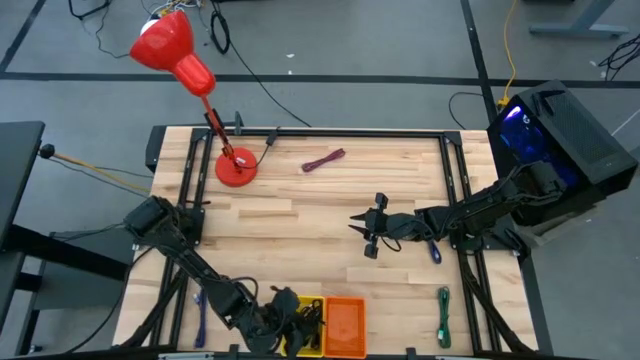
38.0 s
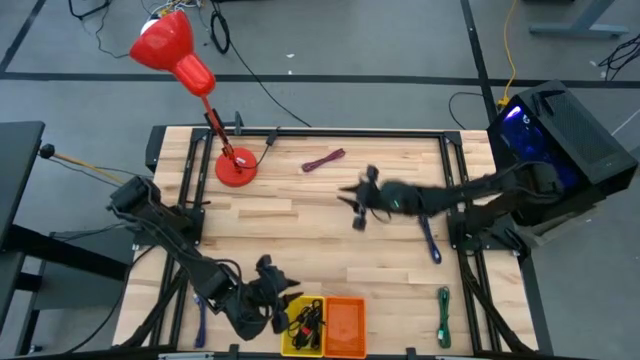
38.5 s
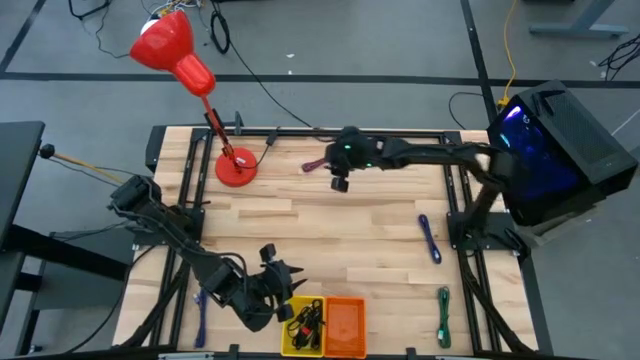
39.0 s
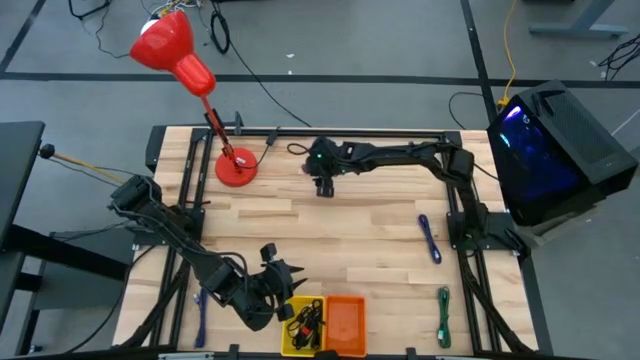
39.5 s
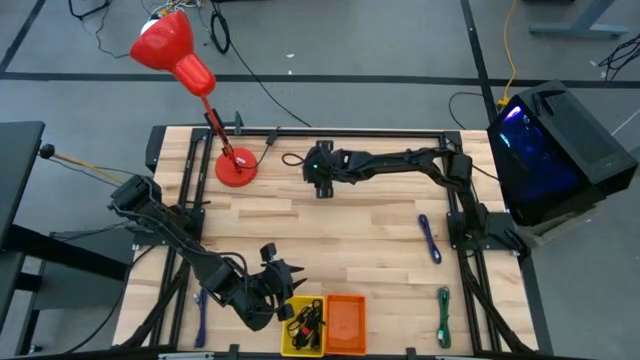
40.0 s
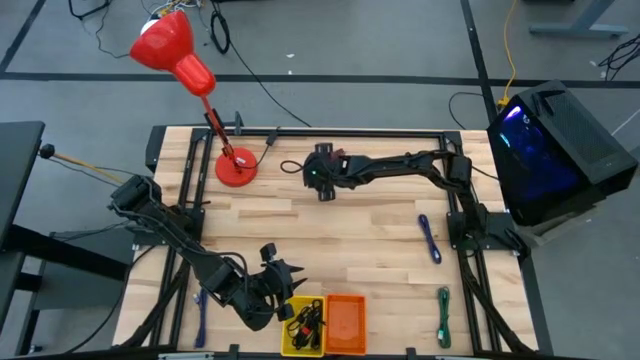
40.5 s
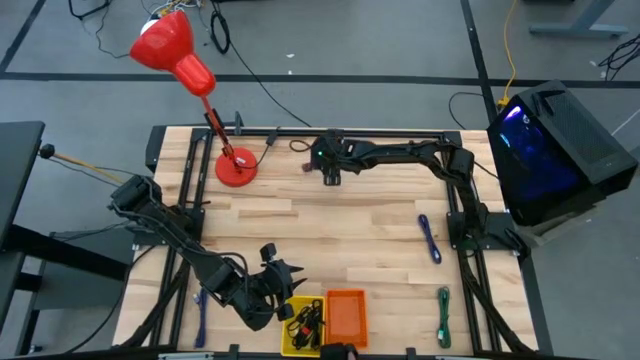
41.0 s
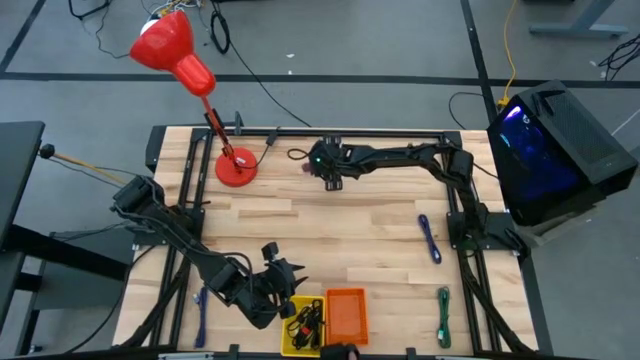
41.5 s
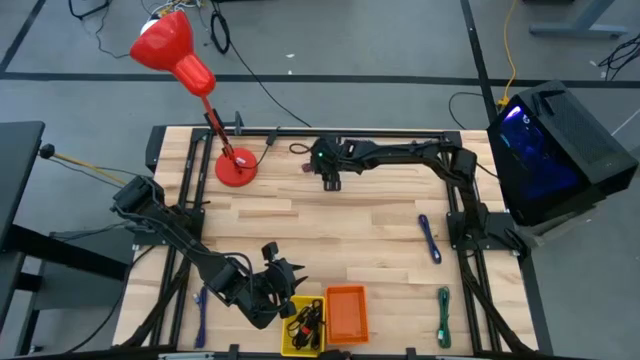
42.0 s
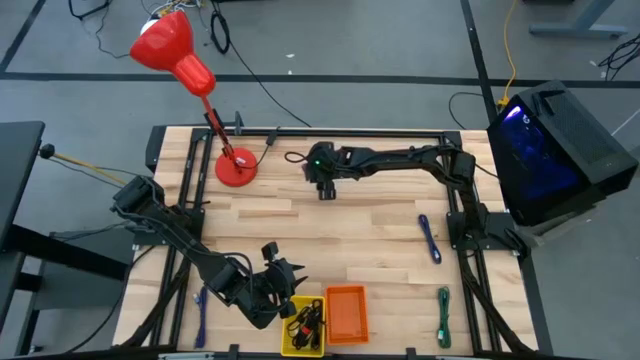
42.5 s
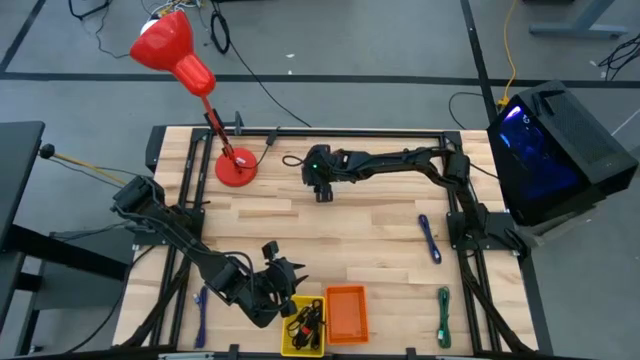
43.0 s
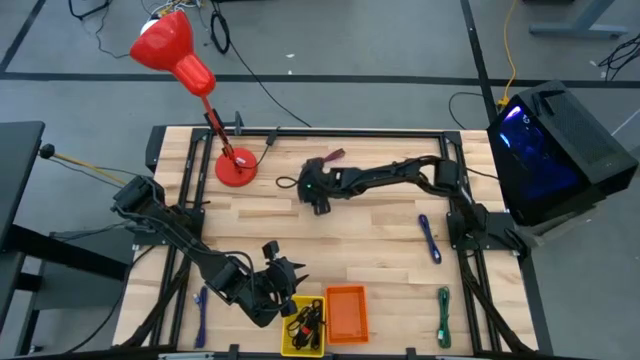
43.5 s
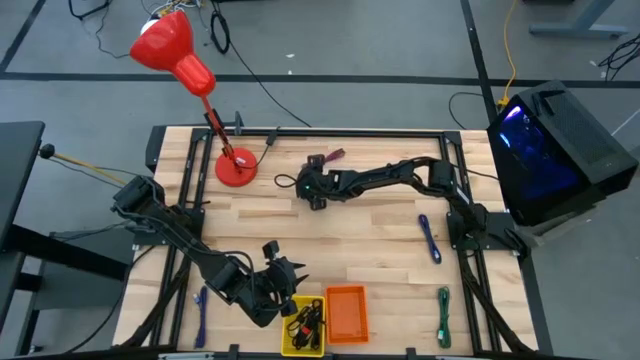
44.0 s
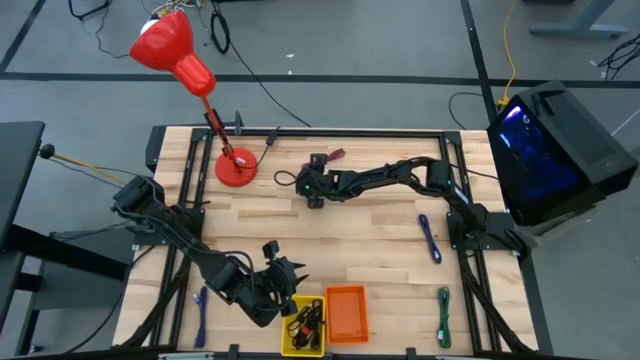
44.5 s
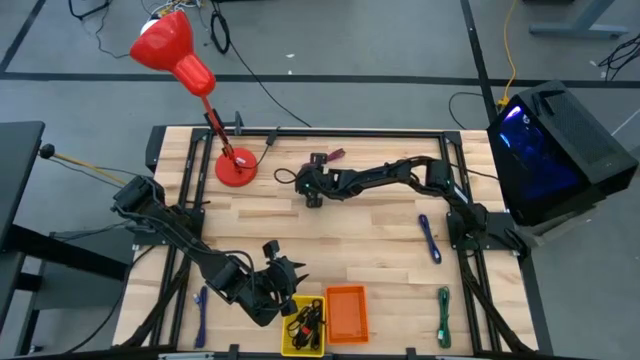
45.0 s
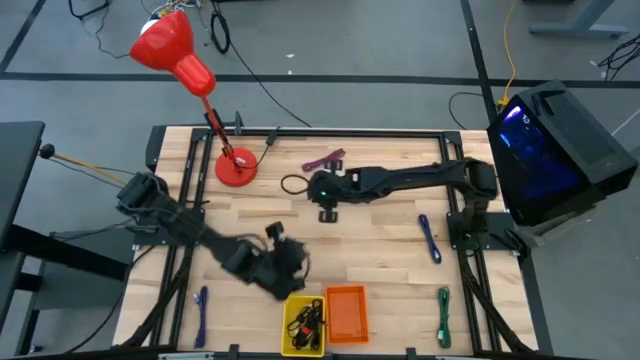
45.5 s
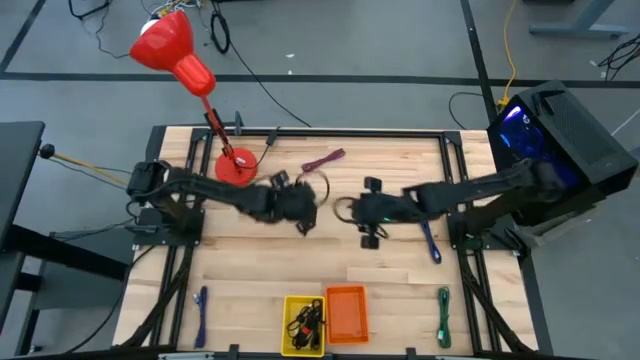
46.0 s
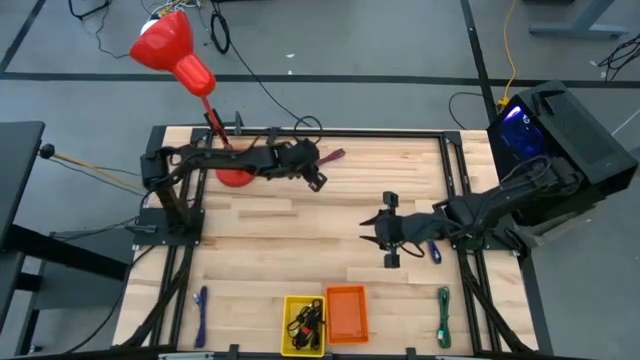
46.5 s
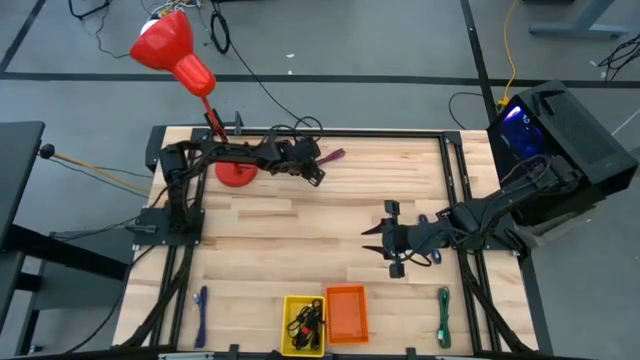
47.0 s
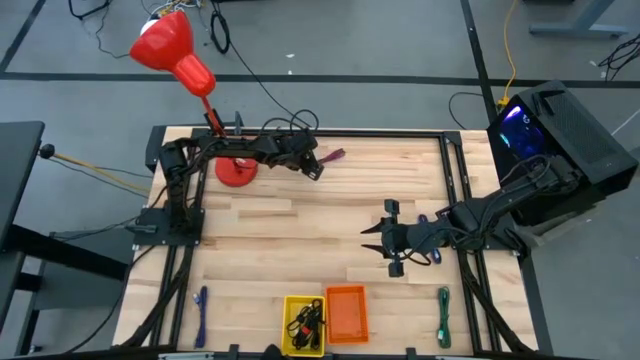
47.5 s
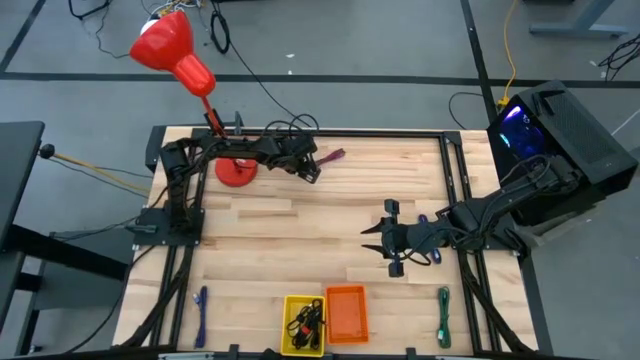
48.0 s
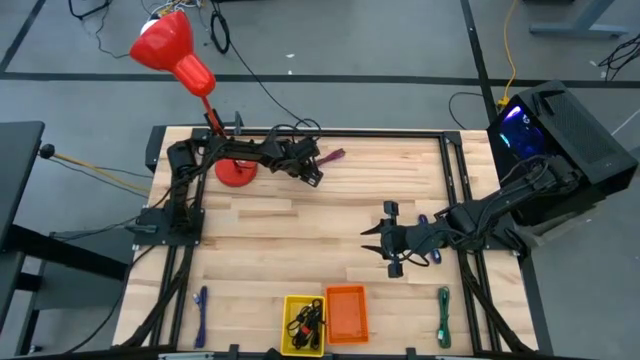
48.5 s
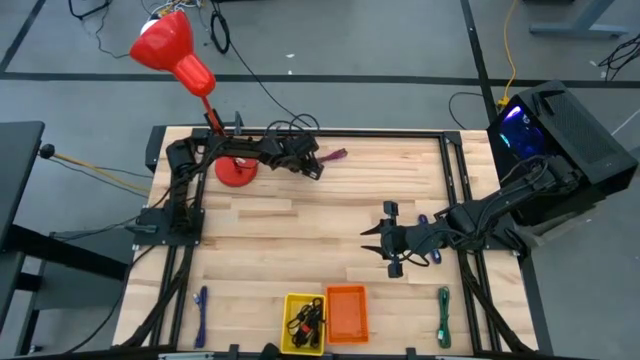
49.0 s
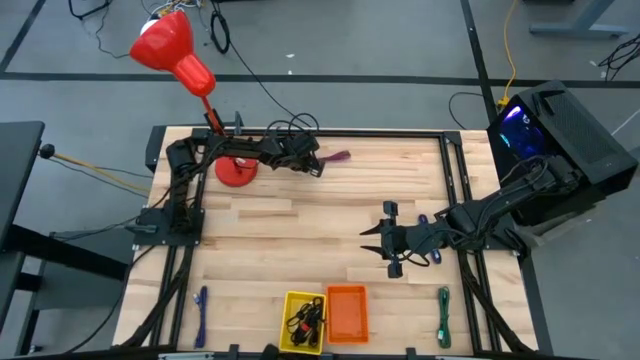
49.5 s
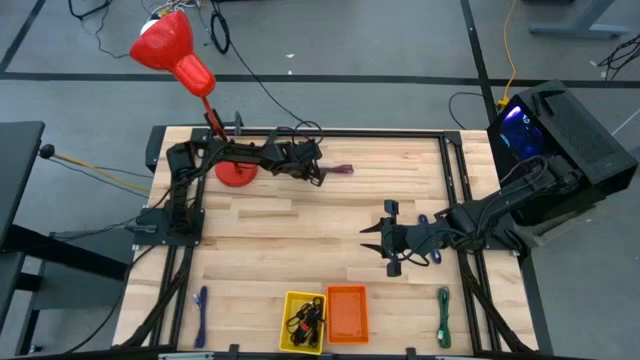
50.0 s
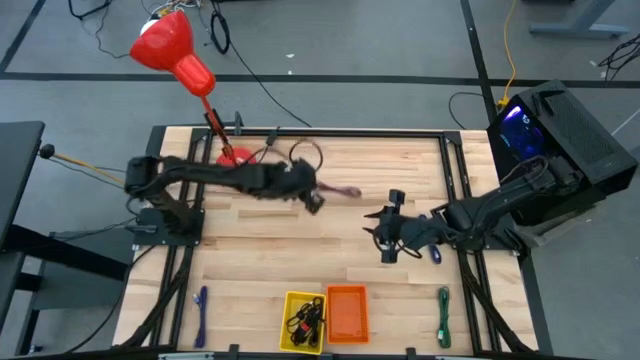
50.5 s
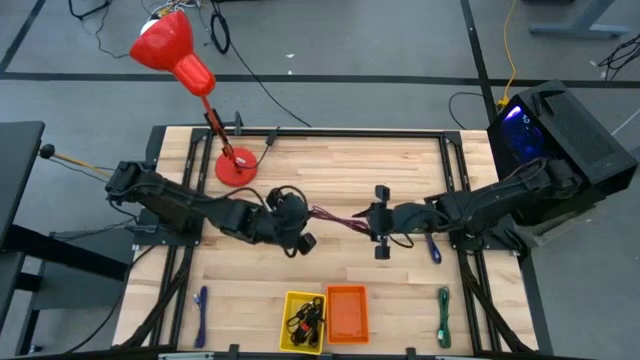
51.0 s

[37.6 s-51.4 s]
Task: Pick & Place USB Port
Put the black and pink charger cable into the orange bin

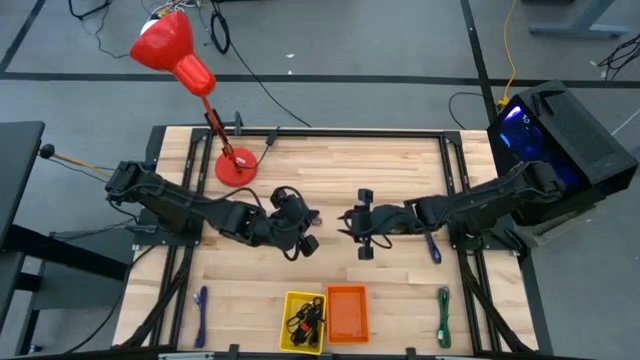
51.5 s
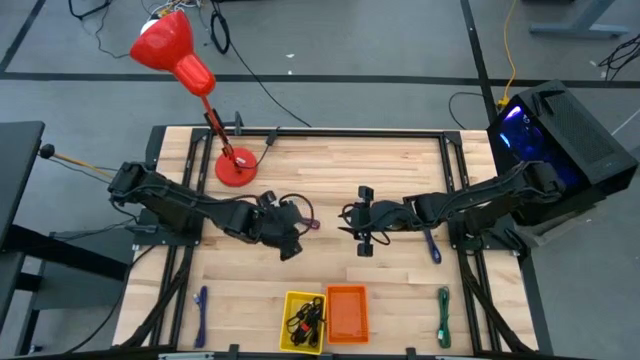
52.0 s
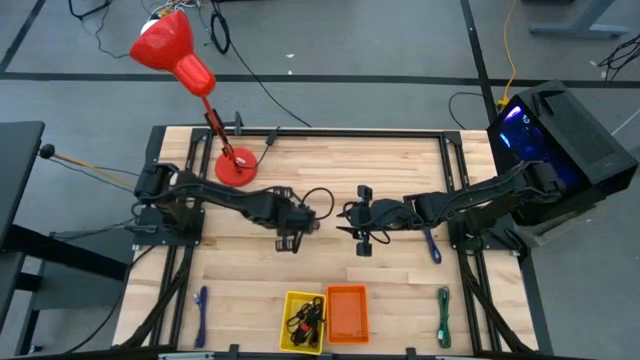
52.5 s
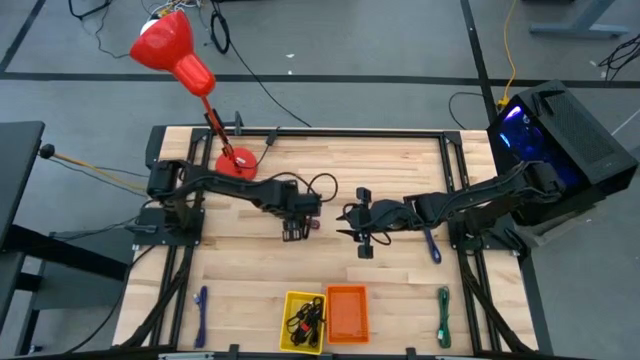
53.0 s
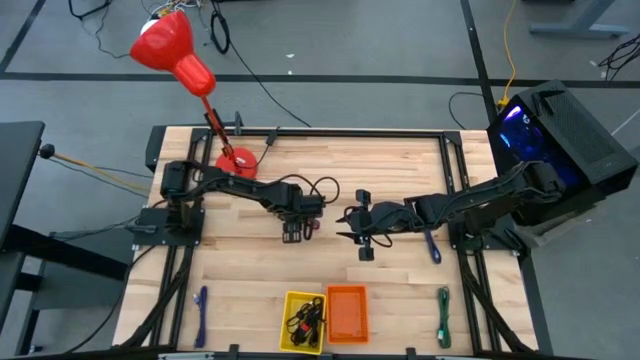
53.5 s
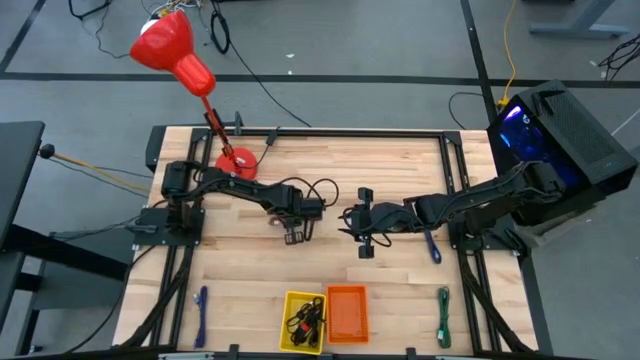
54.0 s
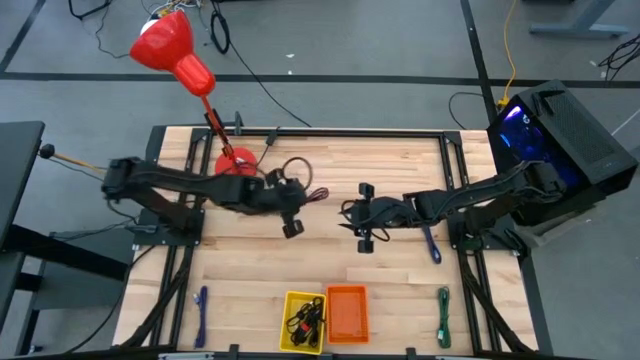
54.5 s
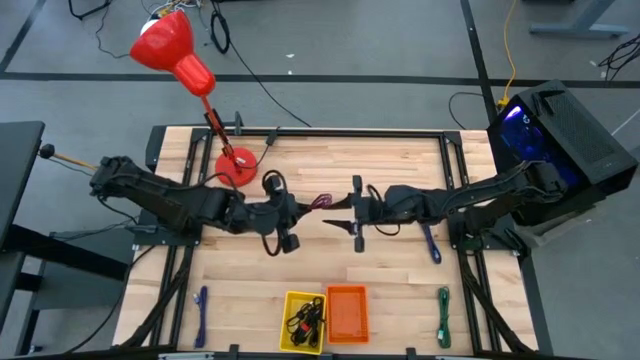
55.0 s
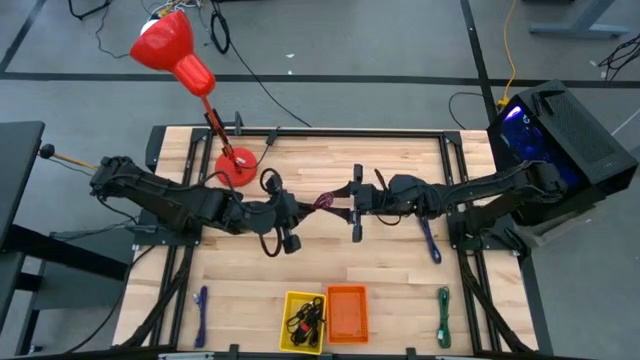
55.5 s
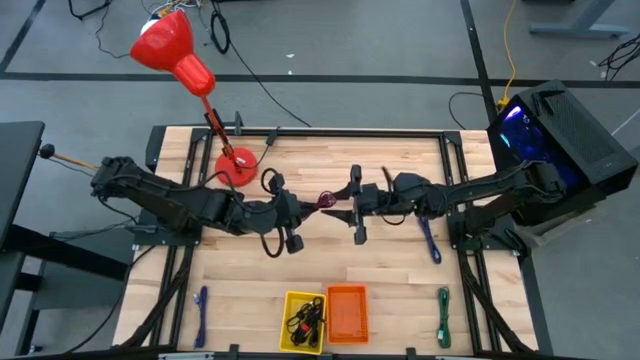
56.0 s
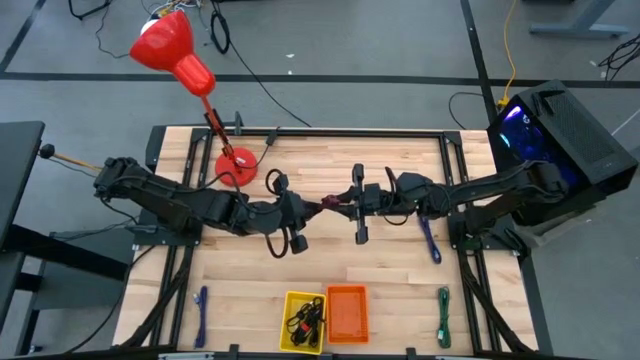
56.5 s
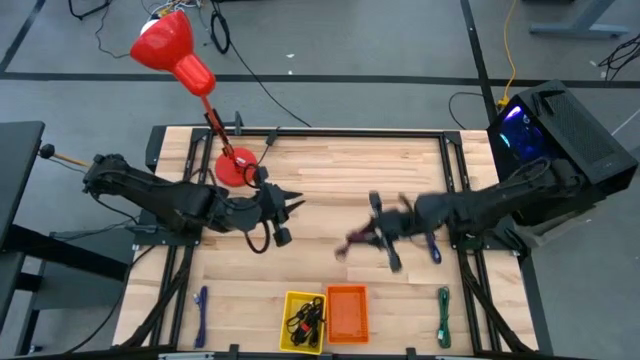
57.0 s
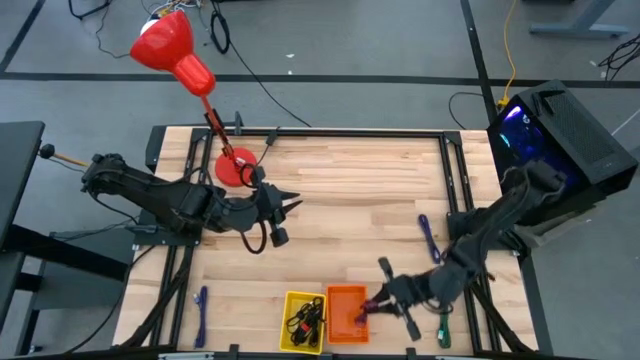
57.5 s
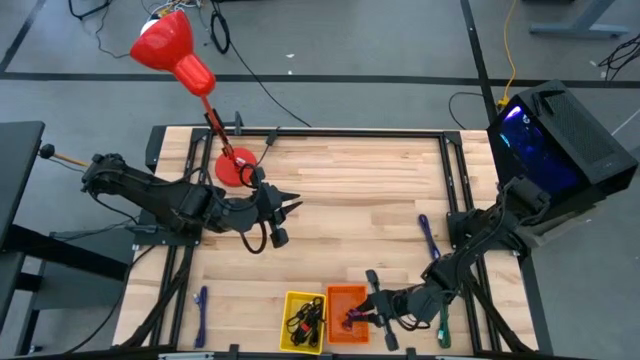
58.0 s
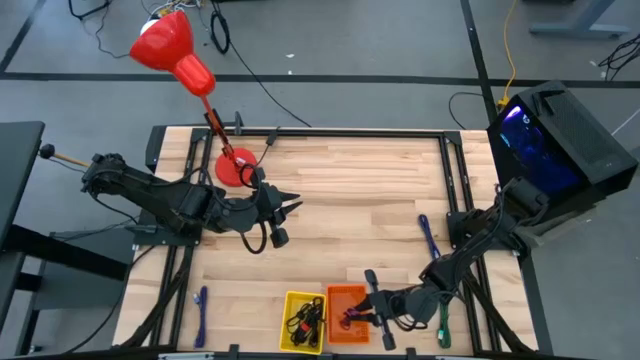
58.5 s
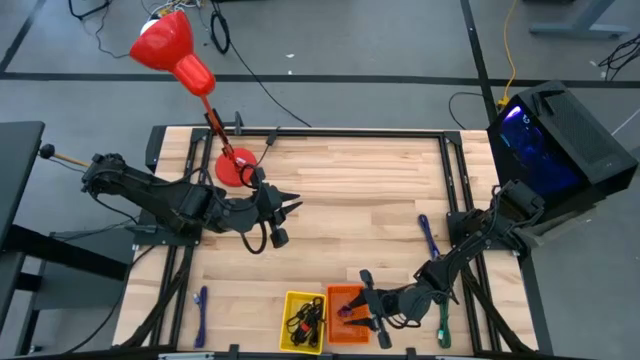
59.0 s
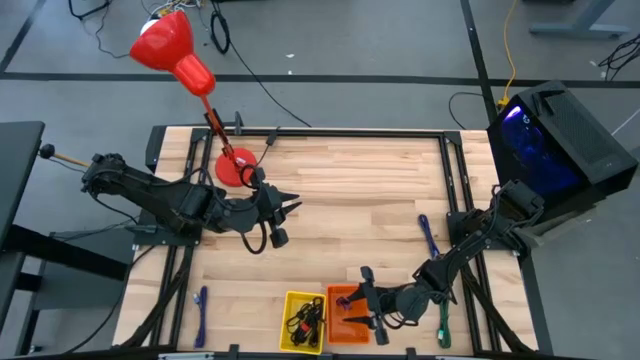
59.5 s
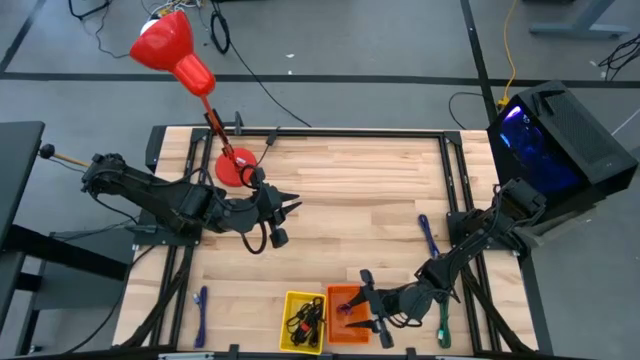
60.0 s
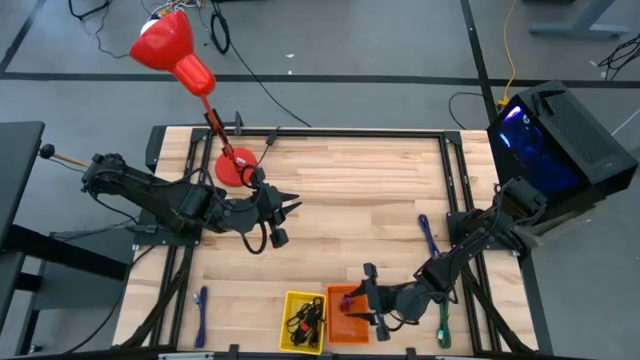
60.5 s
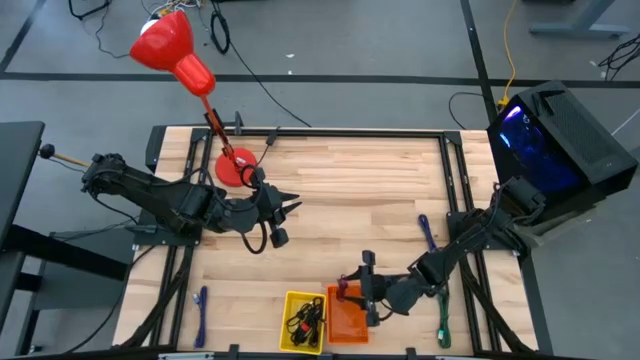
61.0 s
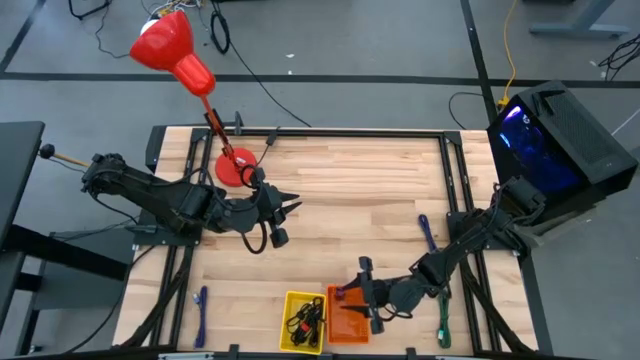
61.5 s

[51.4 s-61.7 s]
Put the black and pink charger cable into the orange bin
